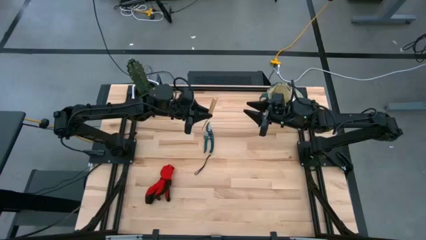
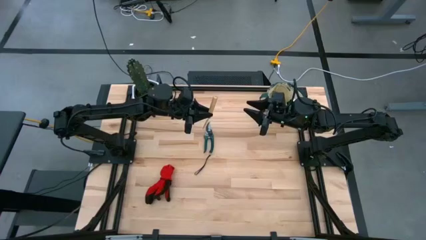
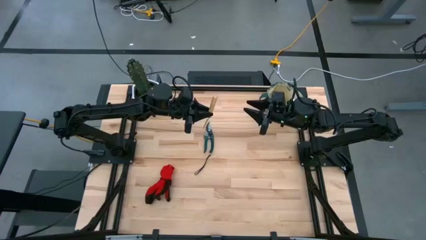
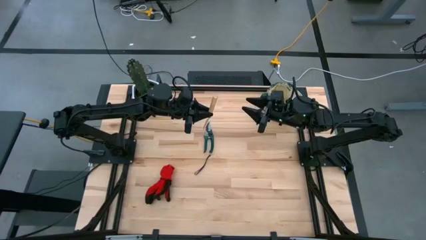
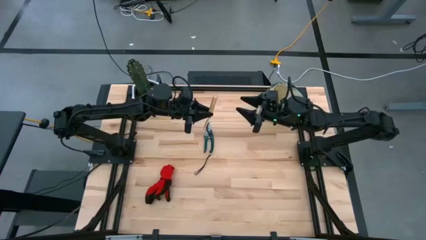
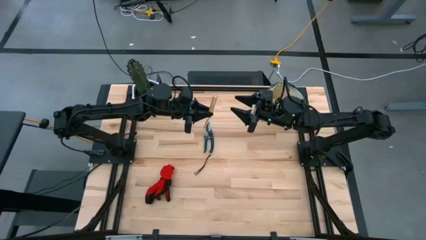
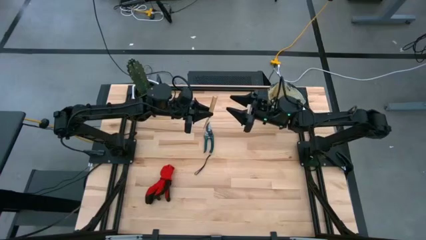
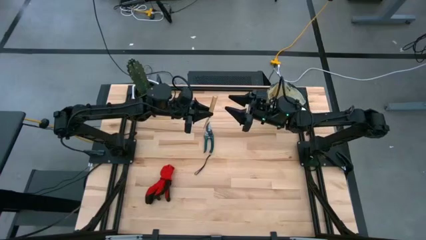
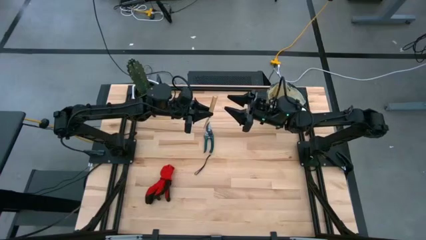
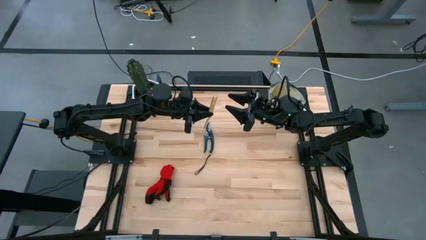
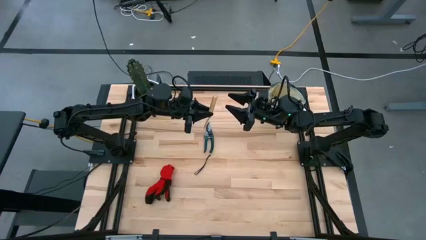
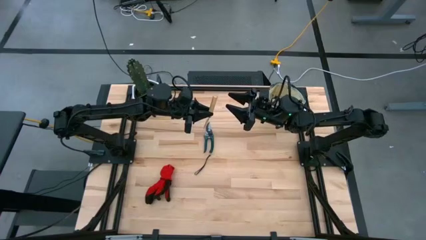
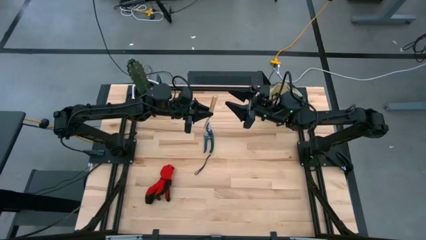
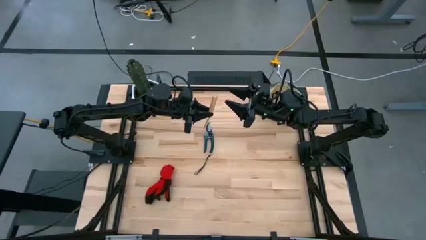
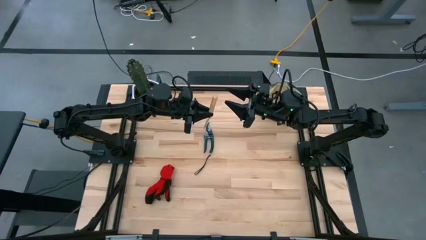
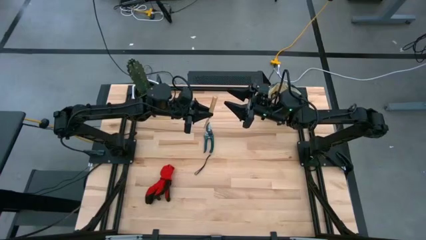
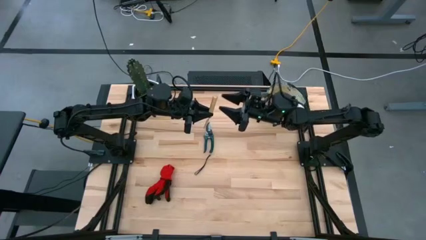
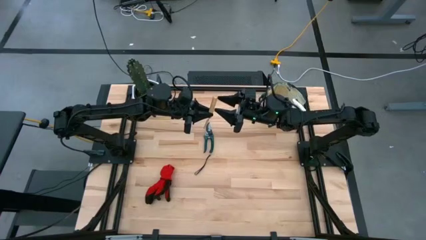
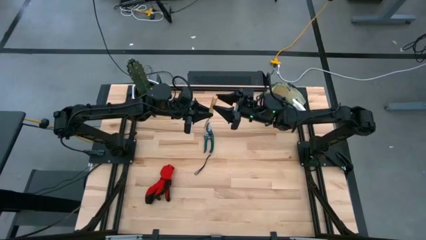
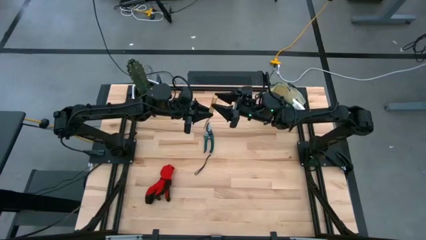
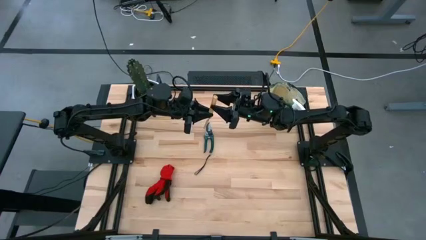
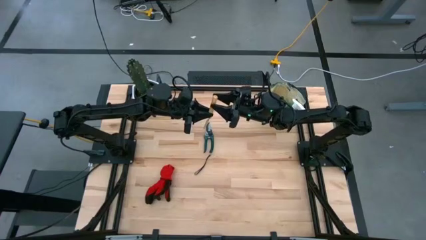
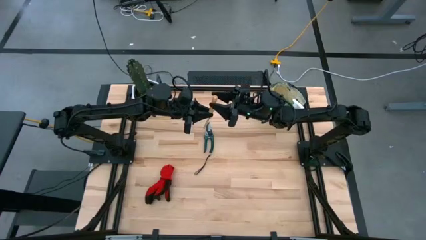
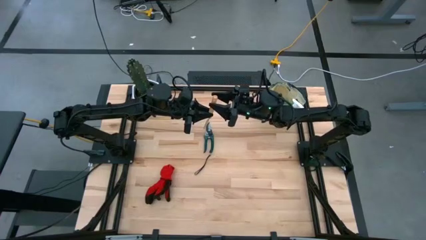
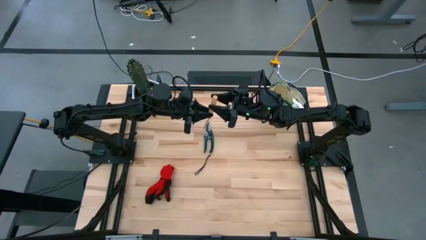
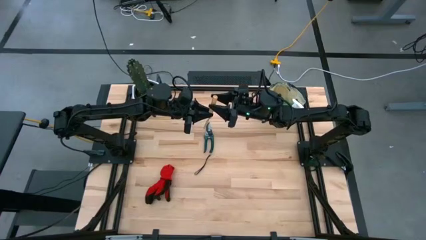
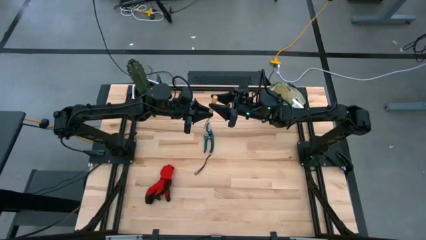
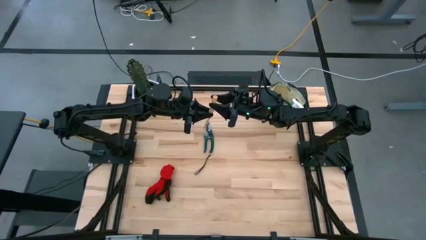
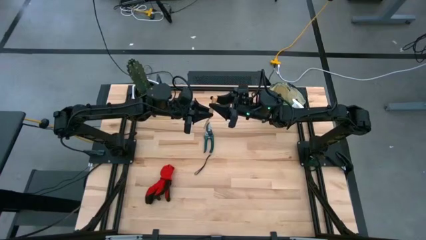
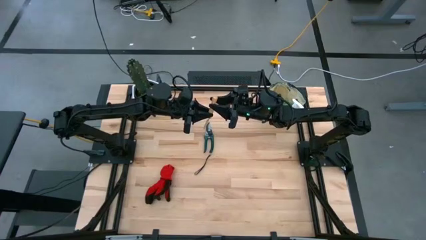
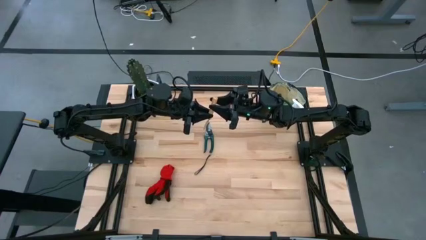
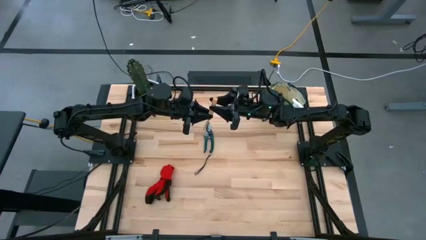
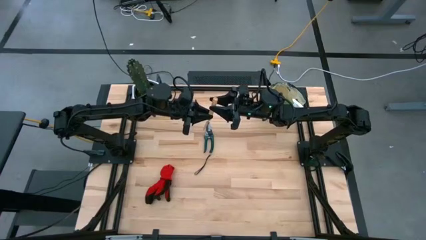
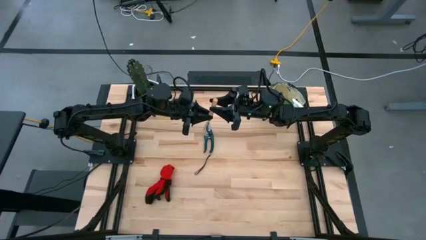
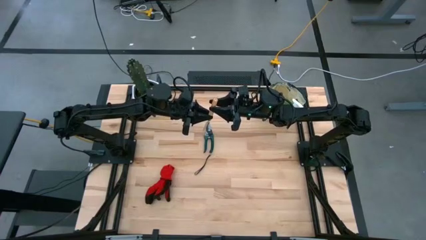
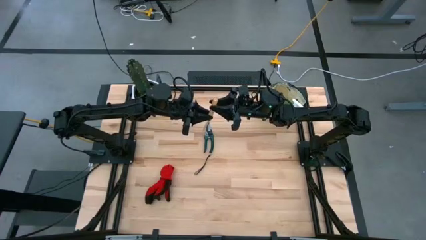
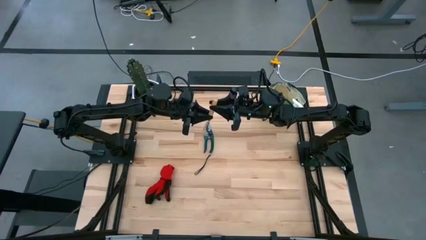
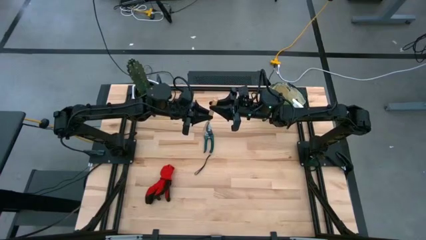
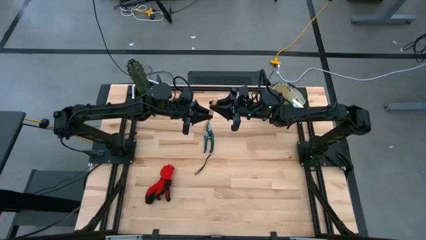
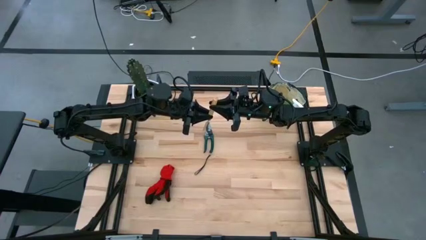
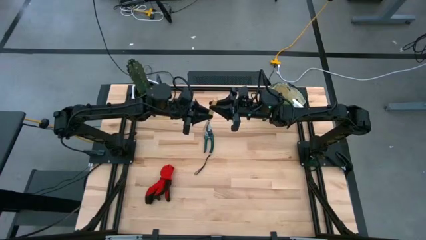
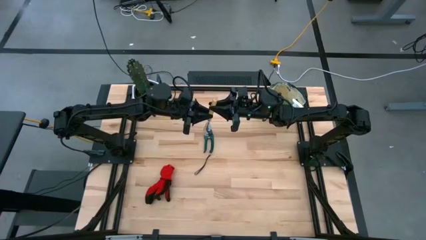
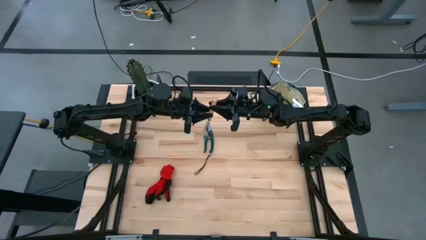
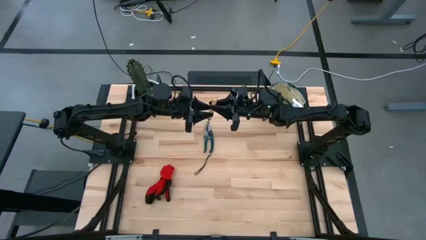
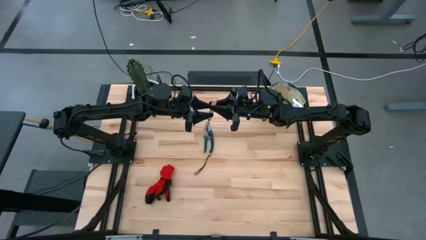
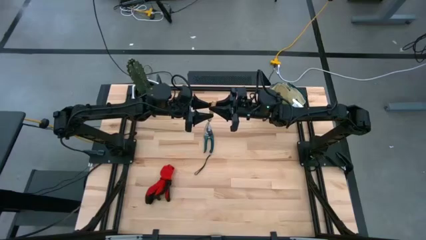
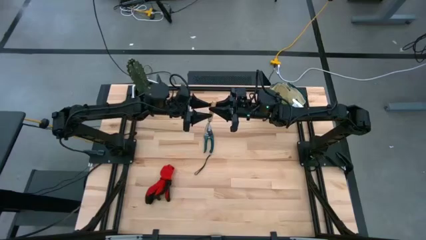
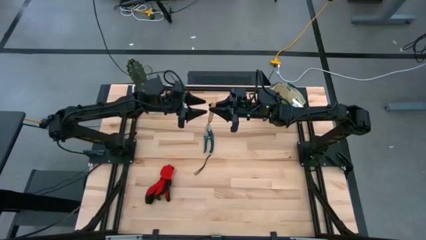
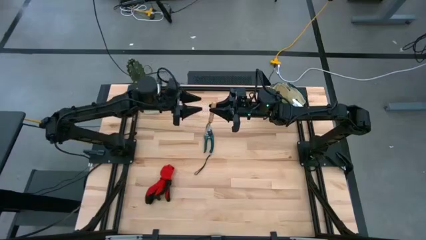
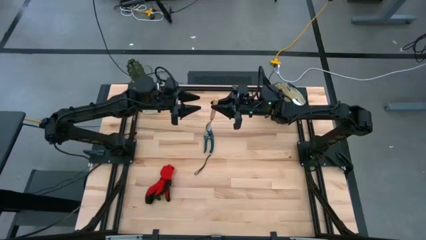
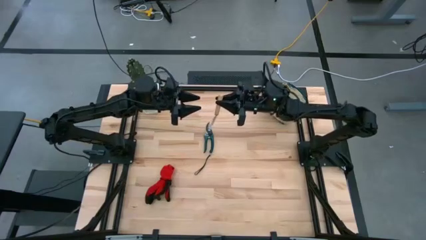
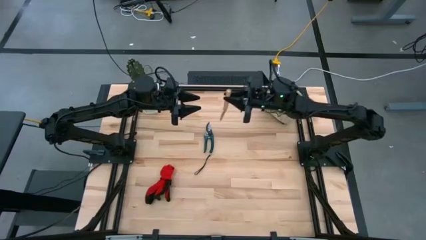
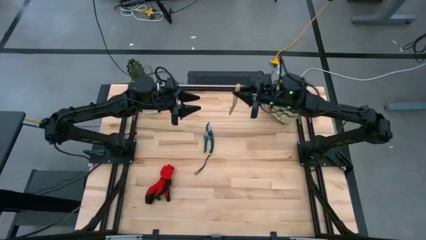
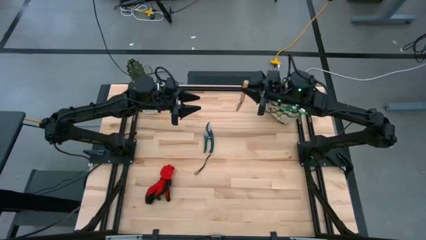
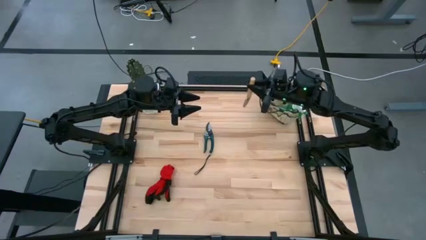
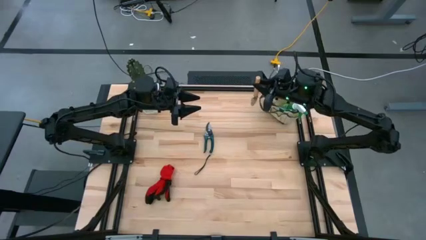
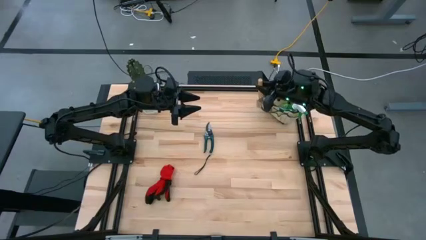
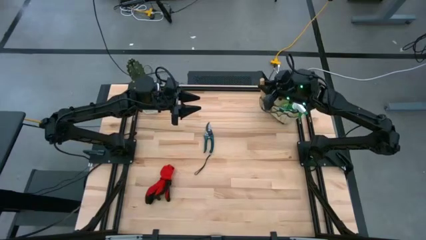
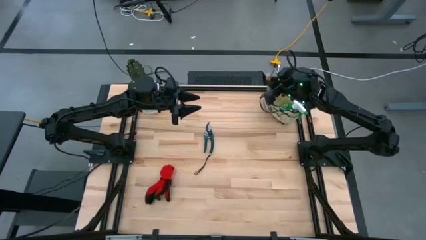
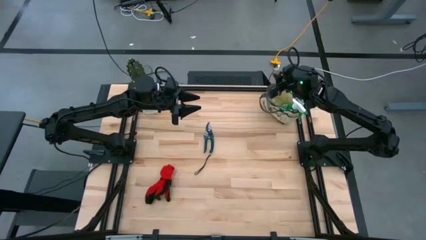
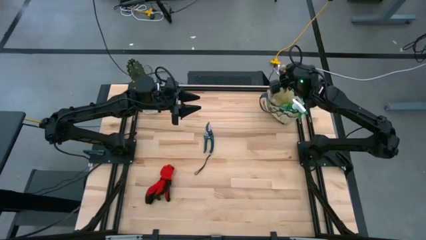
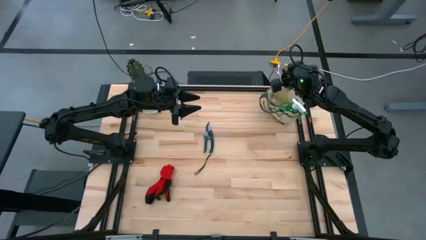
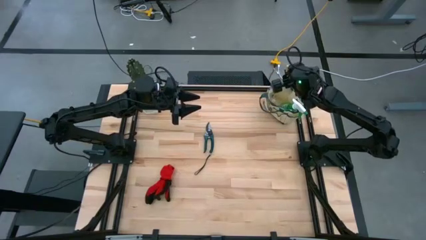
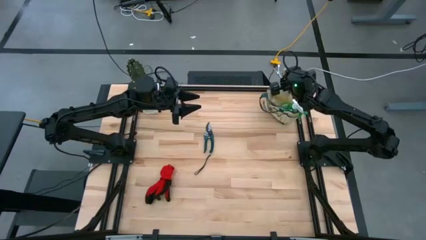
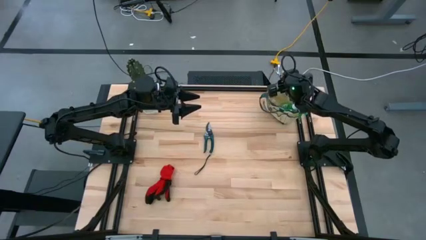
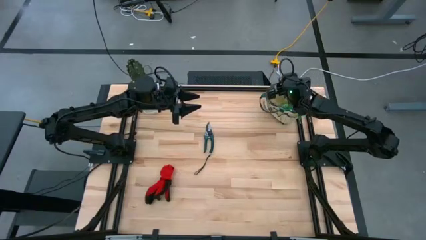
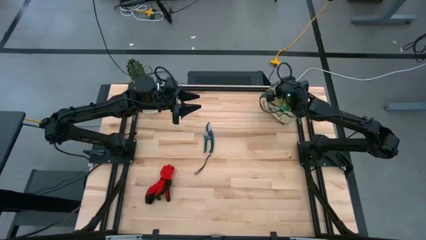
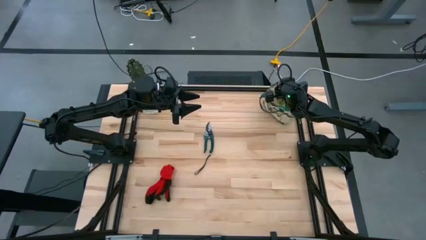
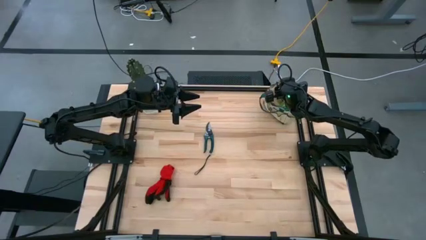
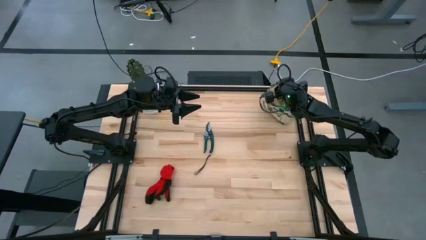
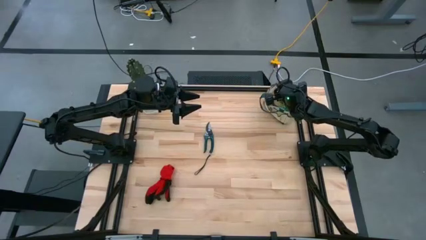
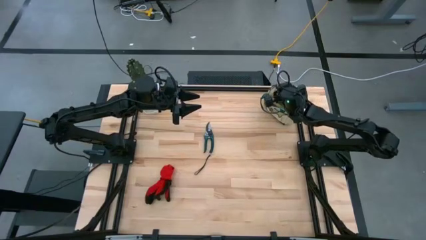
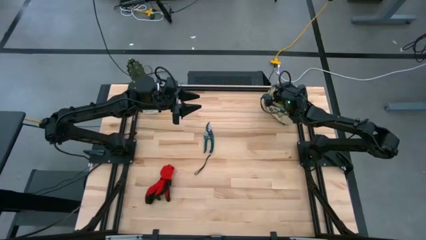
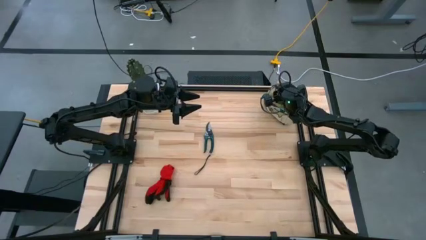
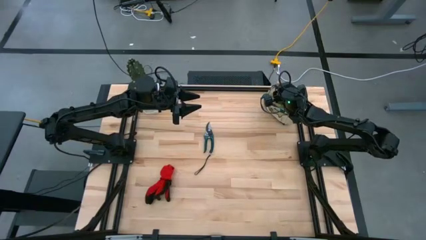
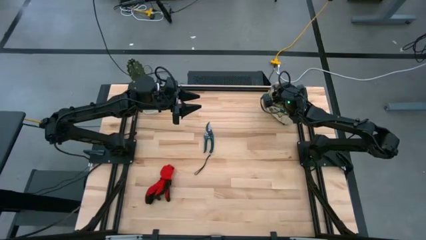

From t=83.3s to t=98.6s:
Task: Pick & Place Garden tools in Gardening bag
Put the brown trowel into the white gardening bag

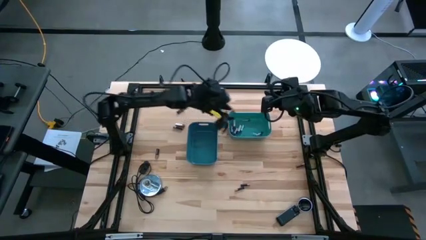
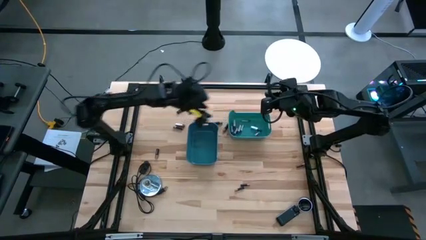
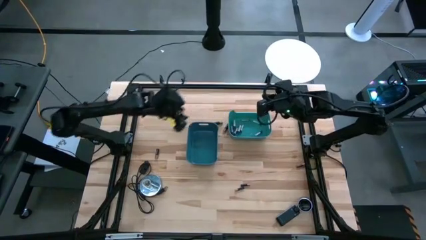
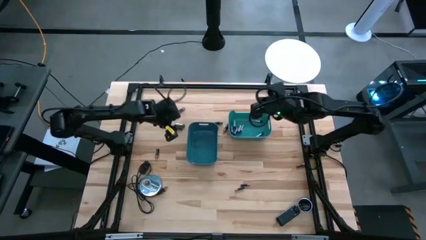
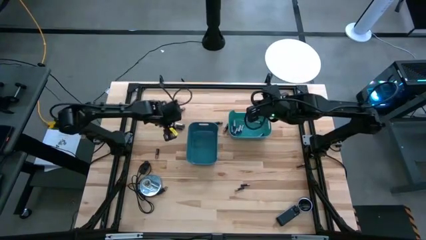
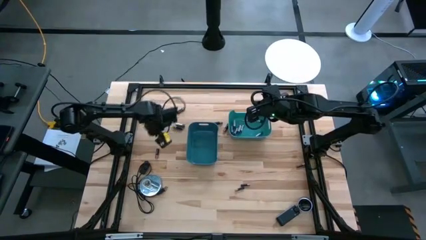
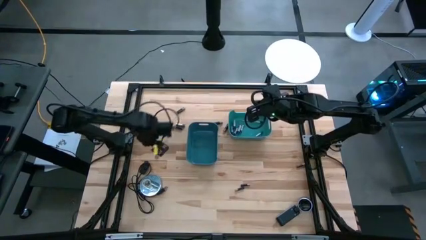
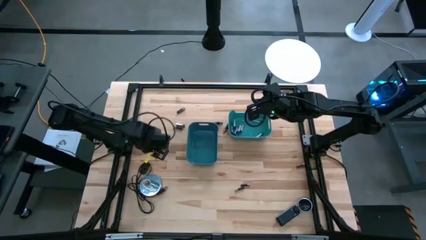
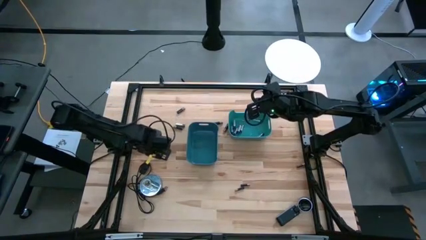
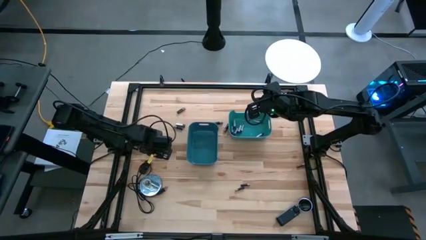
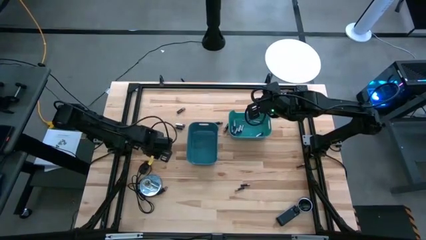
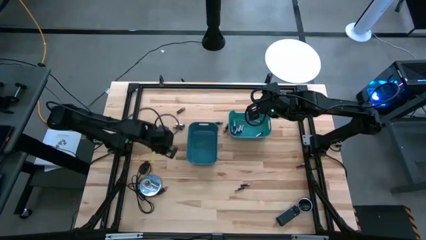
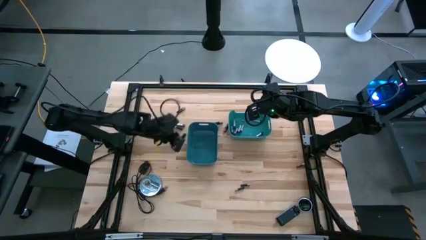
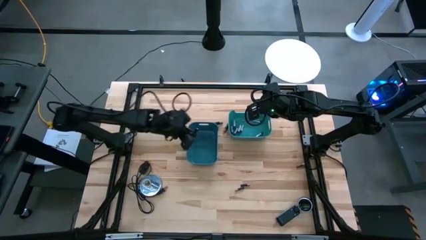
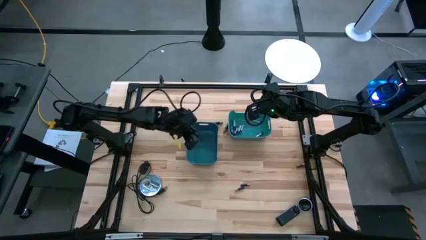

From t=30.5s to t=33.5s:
Task: Sort batteries
Put the black battery into the blue bin
